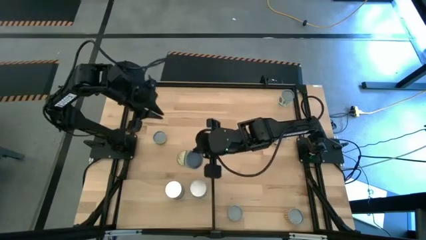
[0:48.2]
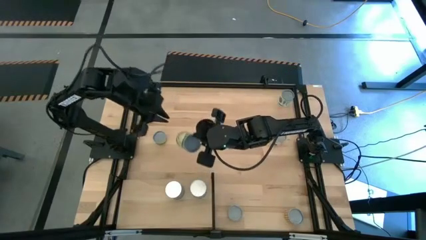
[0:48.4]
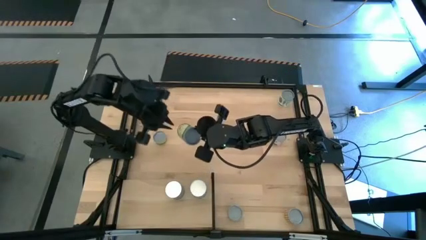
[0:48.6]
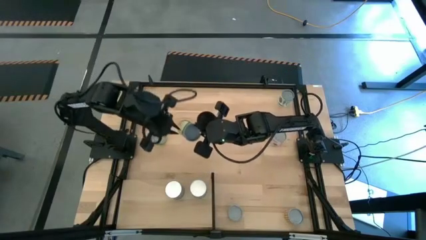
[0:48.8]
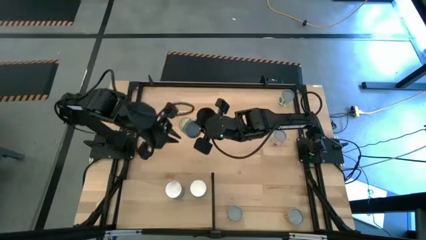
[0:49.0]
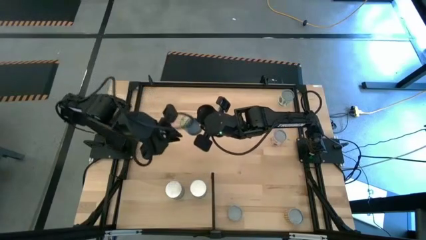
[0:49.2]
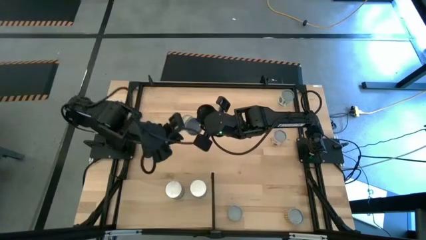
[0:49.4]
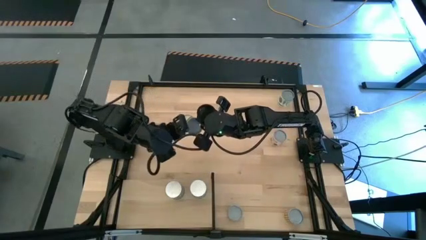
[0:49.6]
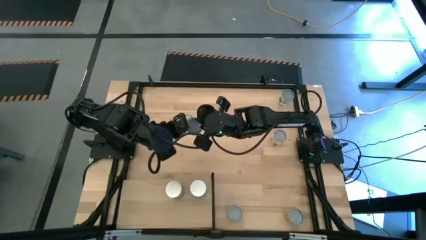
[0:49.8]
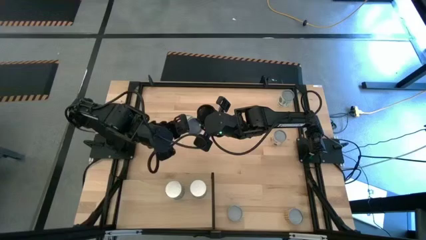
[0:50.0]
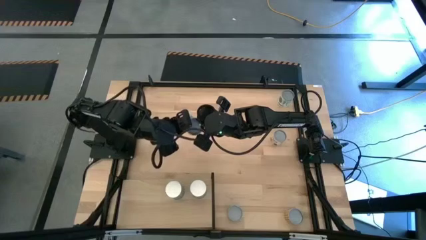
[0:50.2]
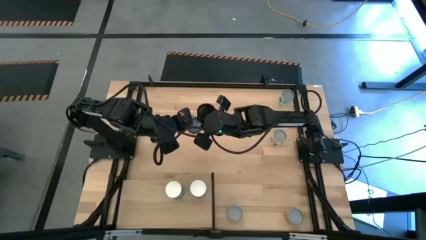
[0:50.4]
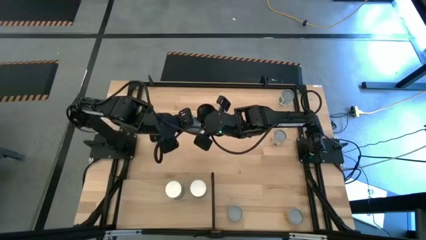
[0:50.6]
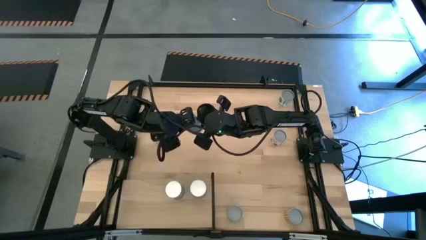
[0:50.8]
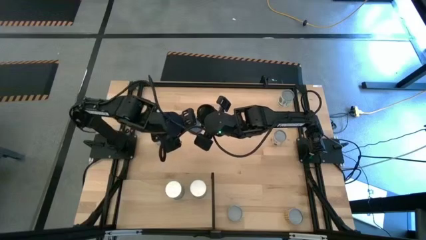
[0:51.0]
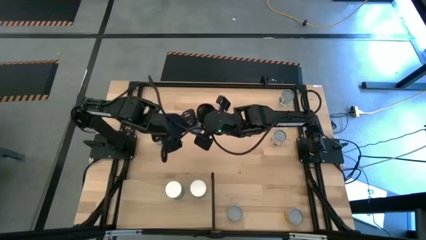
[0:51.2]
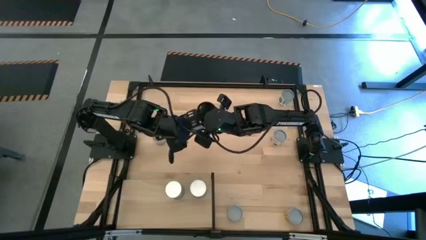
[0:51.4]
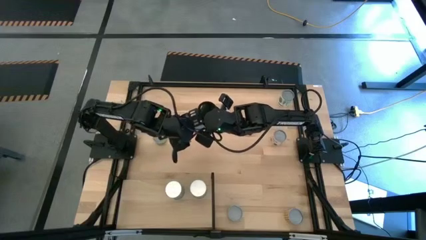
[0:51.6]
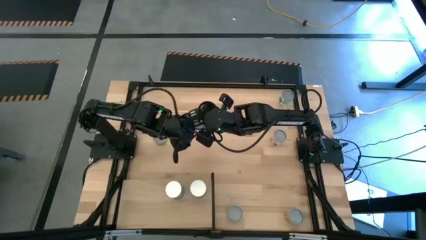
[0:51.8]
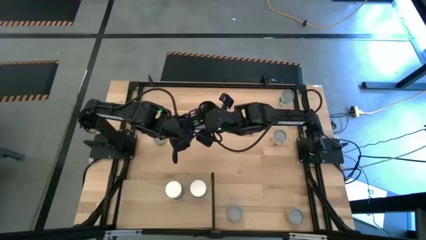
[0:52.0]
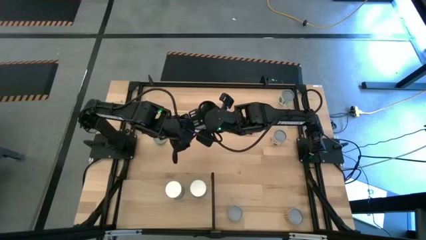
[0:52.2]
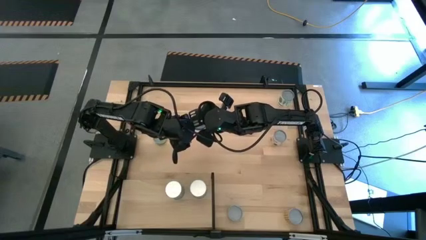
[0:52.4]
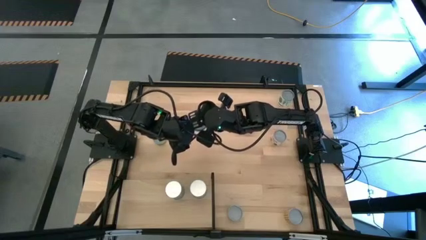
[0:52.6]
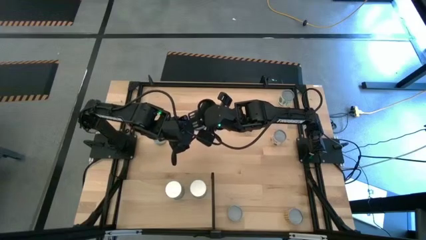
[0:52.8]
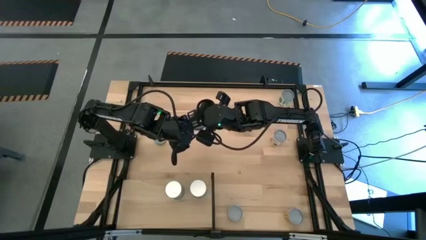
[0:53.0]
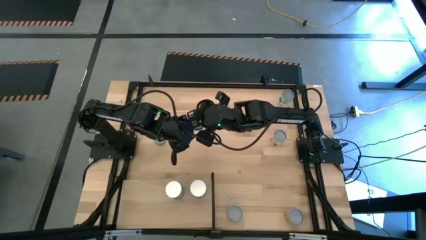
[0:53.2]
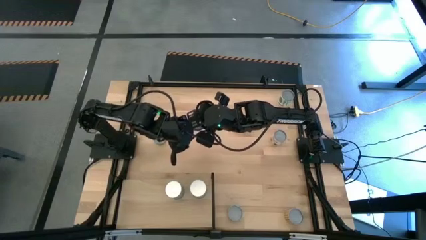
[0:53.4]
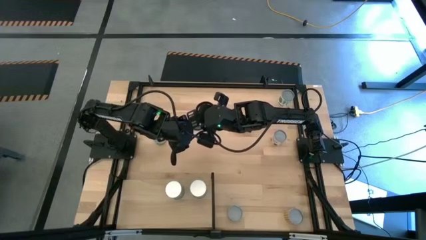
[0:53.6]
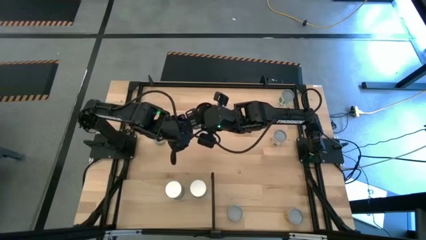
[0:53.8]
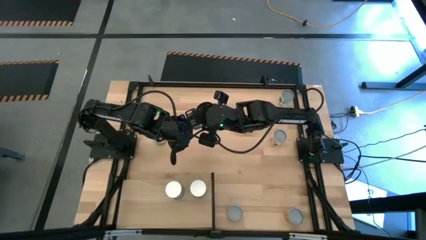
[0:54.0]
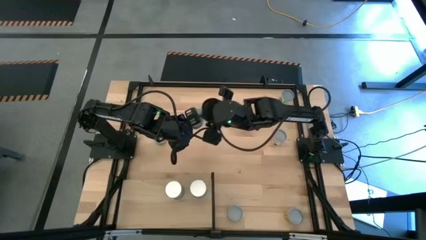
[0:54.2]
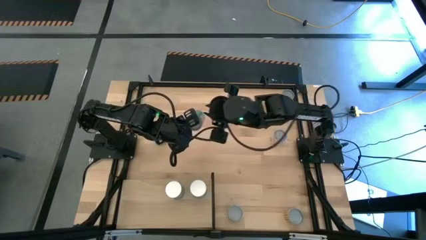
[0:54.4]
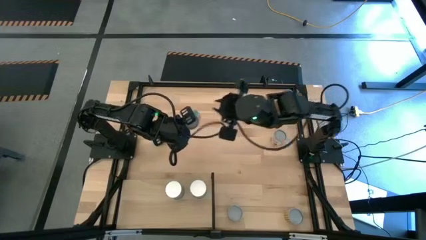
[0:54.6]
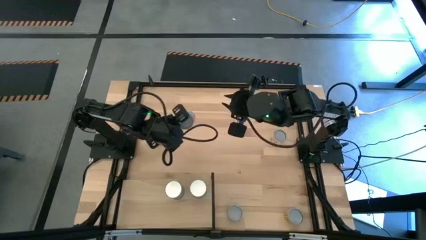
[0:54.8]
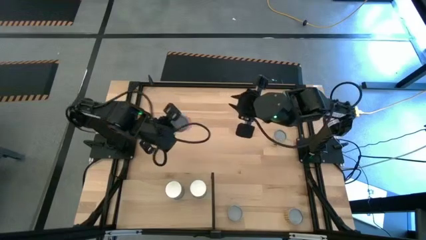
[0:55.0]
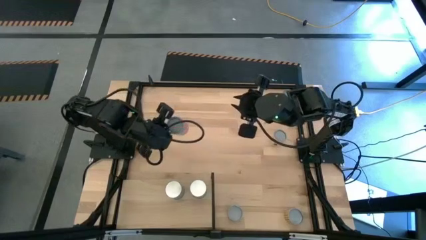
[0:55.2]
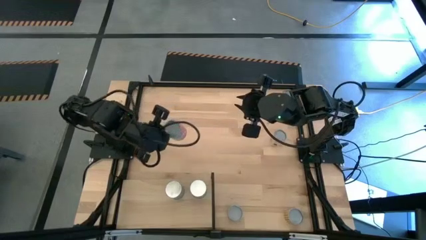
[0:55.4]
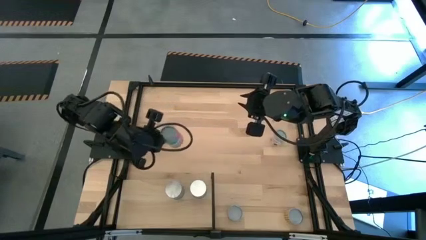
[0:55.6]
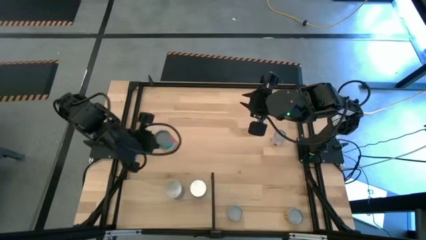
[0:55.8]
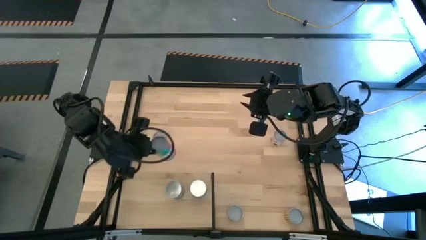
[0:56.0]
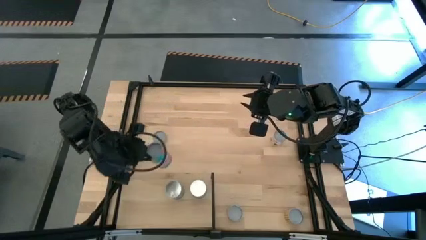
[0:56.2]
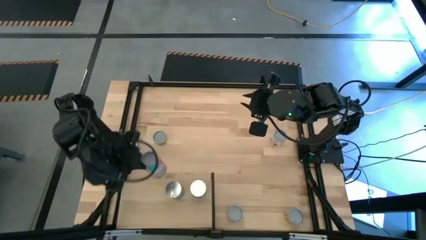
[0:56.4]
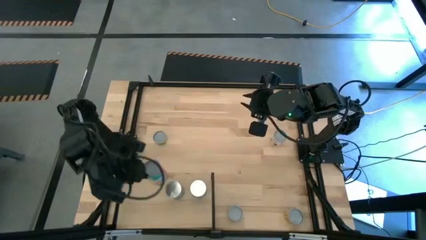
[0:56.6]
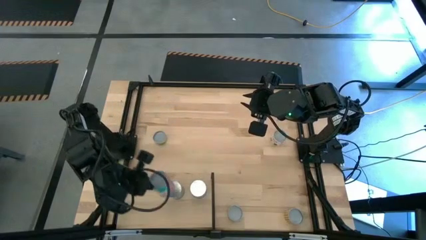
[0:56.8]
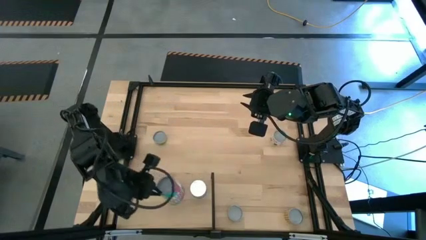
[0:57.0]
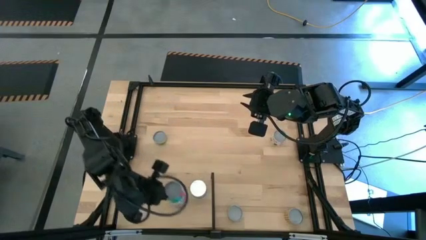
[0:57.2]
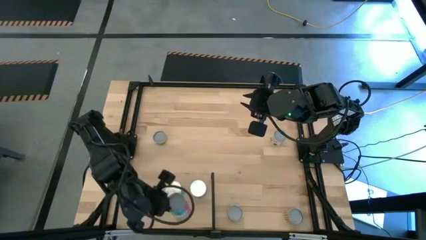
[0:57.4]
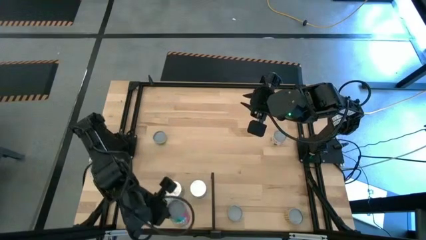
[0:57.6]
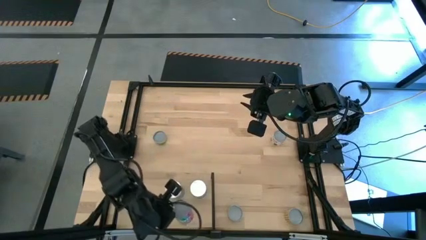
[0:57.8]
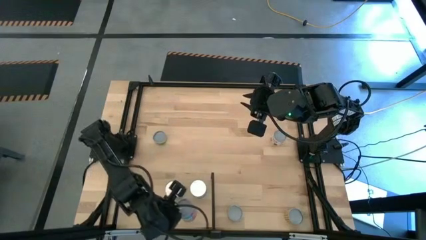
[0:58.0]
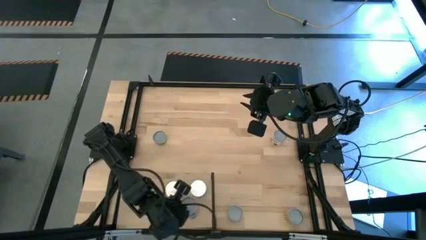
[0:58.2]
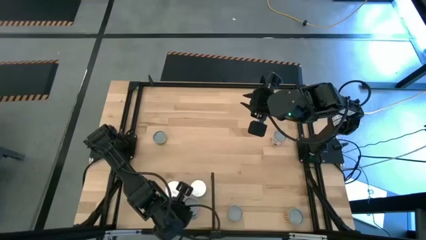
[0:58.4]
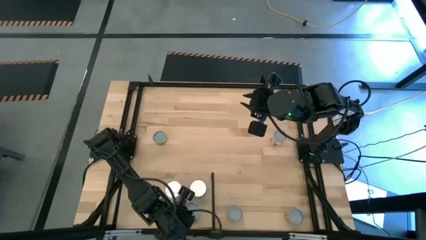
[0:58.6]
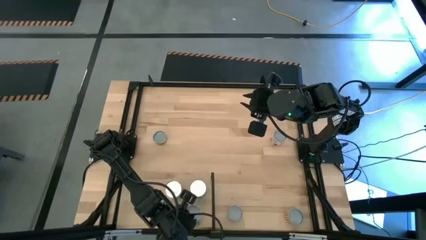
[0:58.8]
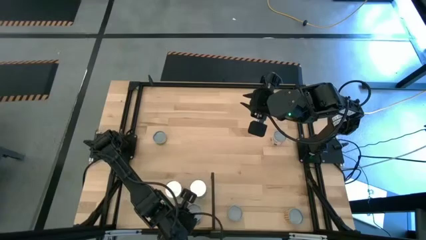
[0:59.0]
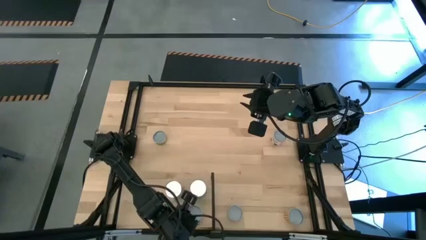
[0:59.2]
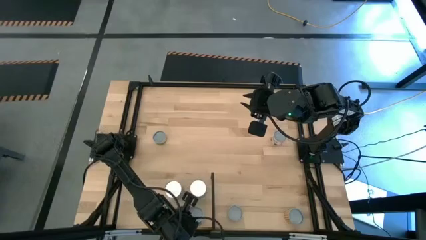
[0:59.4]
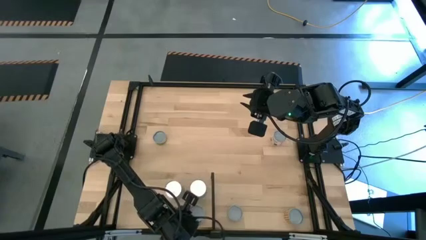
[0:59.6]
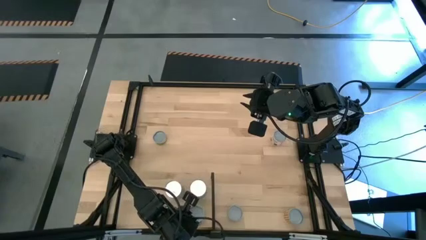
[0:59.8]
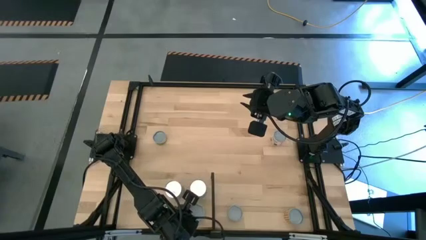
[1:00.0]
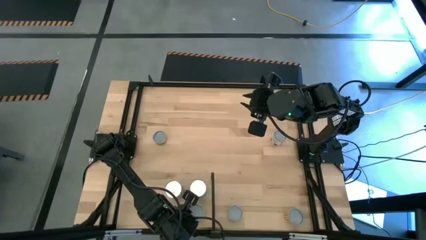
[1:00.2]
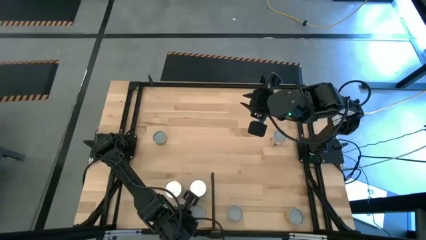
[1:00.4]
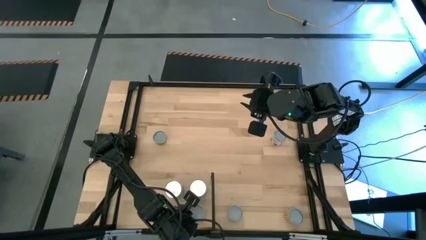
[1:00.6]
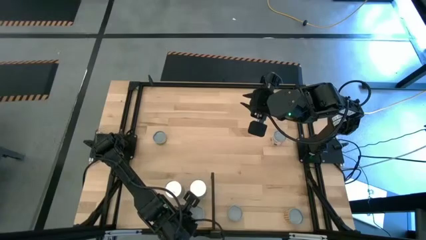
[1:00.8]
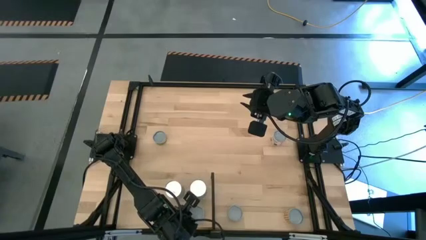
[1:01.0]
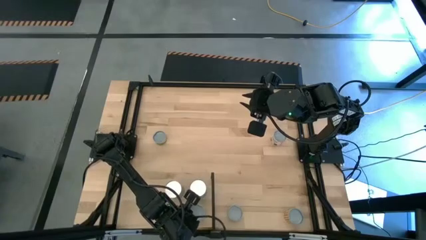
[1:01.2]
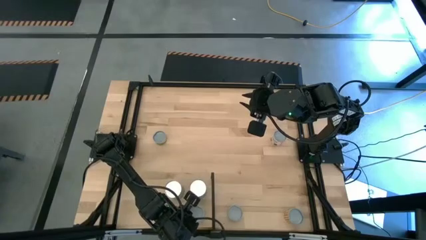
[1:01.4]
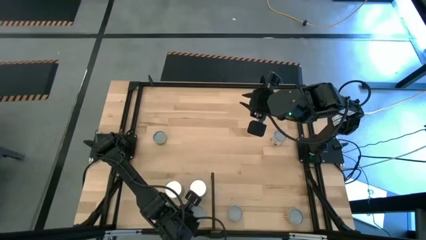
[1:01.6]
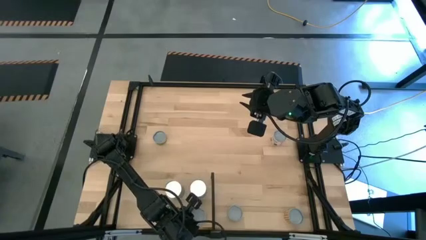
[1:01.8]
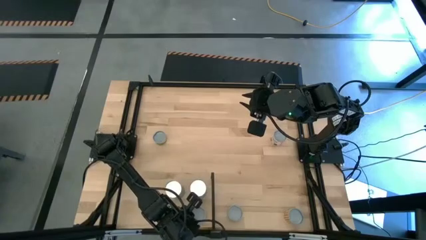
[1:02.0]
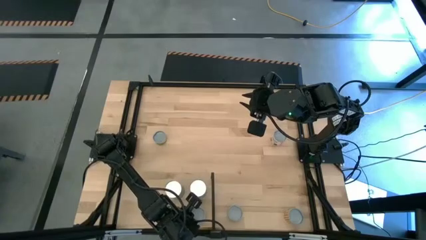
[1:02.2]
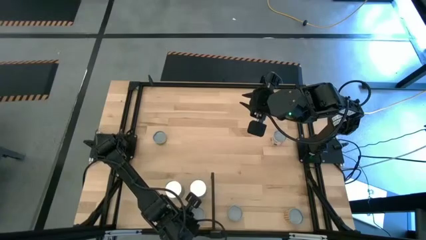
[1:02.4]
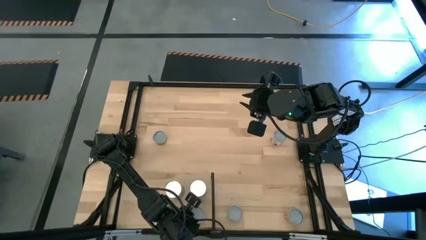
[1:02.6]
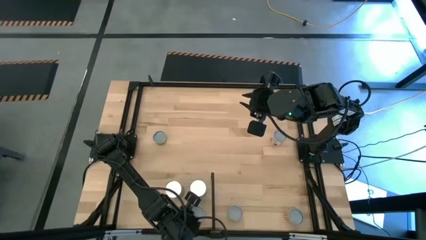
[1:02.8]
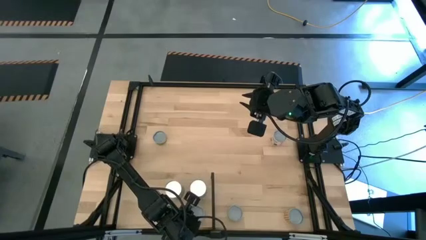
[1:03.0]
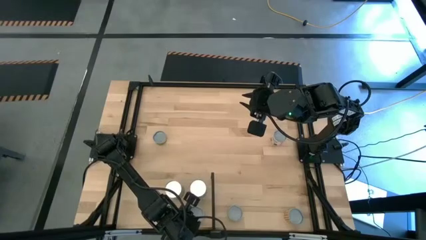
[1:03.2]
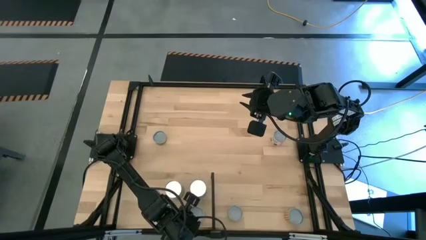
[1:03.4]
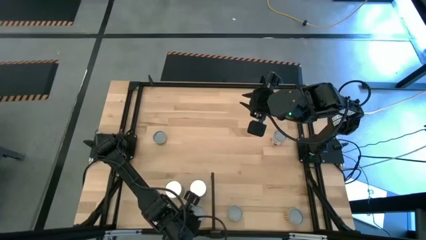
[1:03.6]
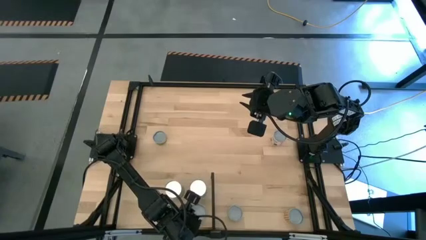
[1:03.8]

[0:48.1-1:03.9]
Task: Pick and place cans onto a shelf
Put the canned chicken soup on the shelf
